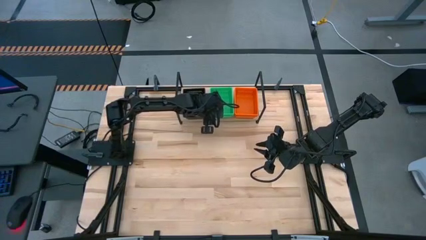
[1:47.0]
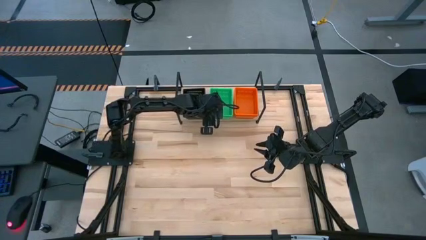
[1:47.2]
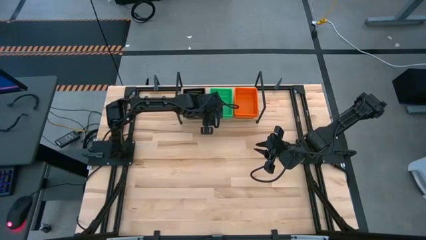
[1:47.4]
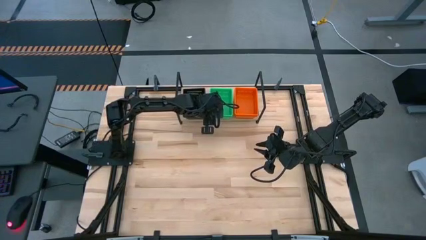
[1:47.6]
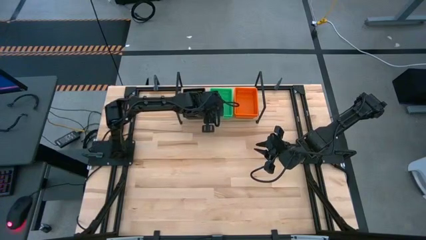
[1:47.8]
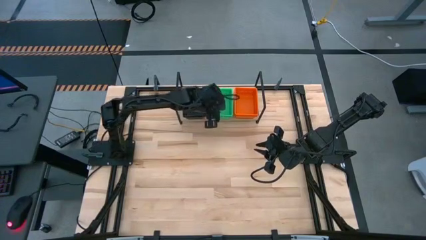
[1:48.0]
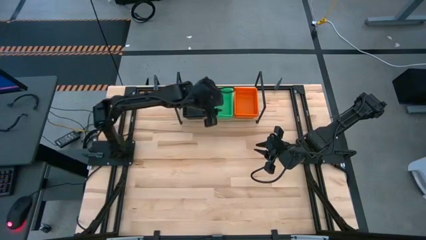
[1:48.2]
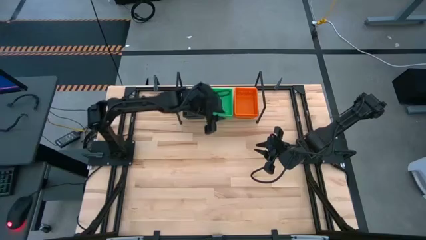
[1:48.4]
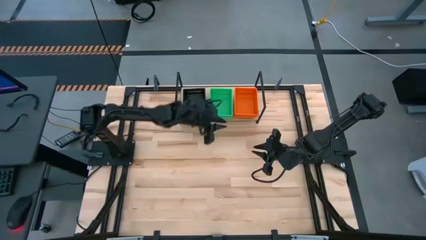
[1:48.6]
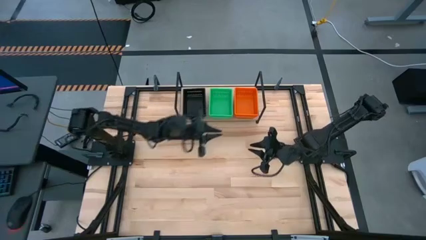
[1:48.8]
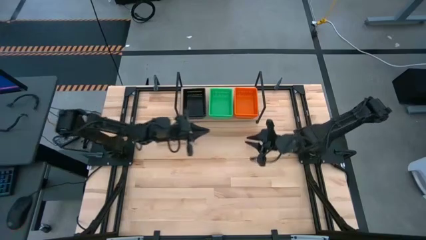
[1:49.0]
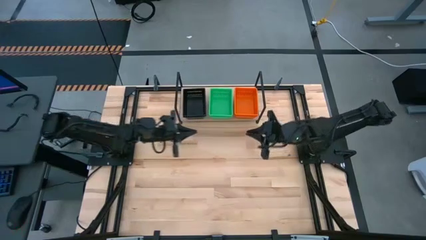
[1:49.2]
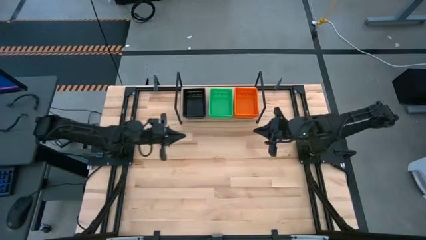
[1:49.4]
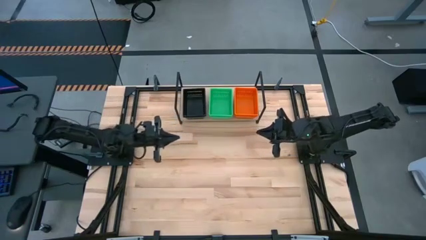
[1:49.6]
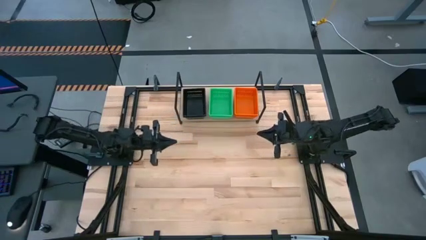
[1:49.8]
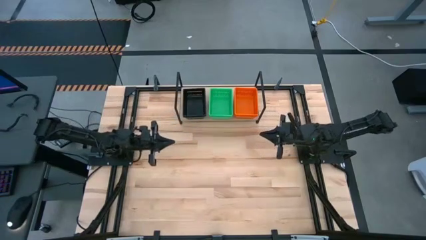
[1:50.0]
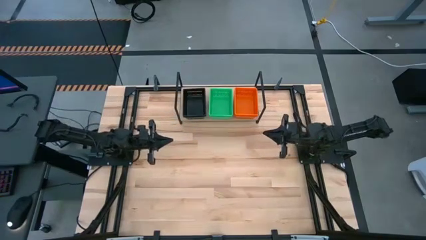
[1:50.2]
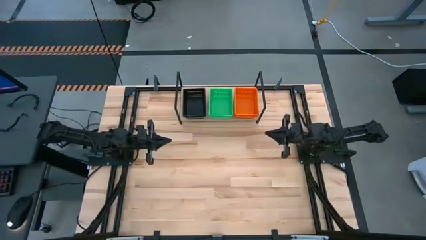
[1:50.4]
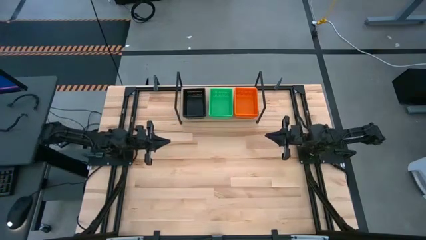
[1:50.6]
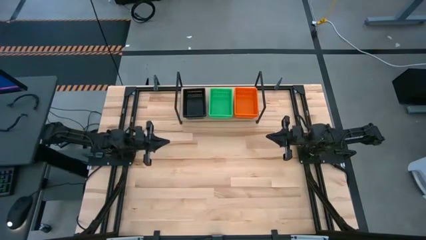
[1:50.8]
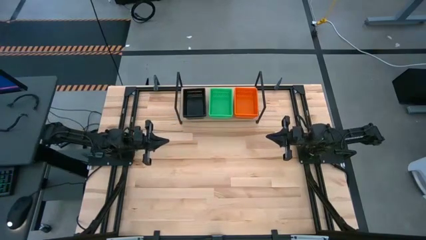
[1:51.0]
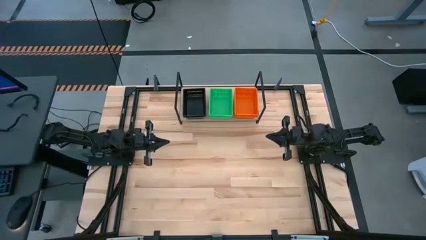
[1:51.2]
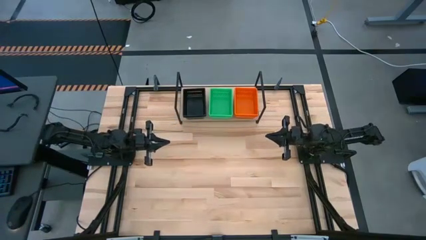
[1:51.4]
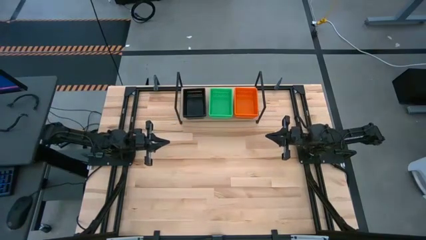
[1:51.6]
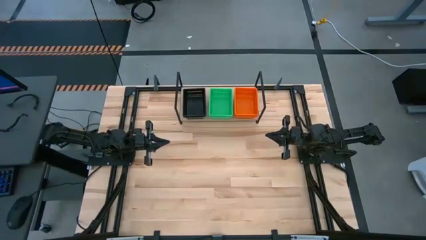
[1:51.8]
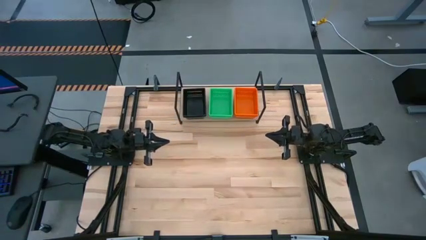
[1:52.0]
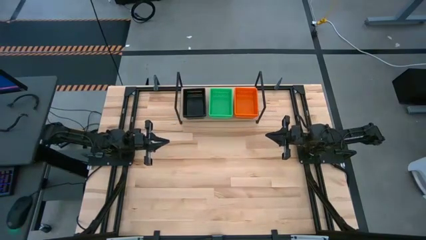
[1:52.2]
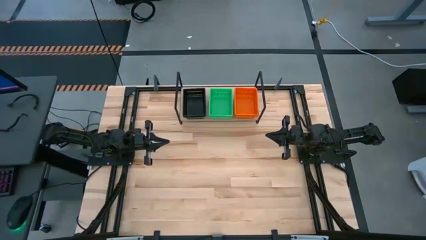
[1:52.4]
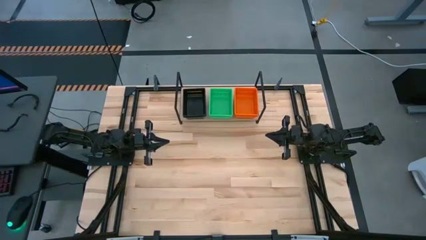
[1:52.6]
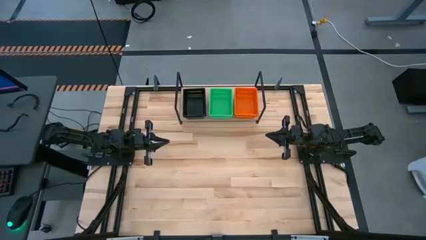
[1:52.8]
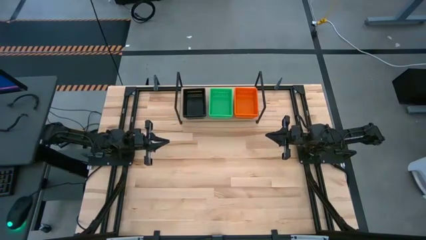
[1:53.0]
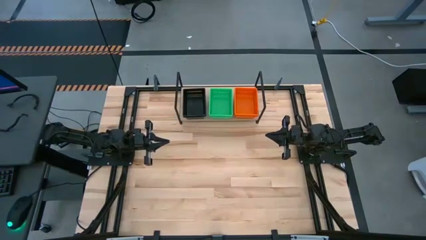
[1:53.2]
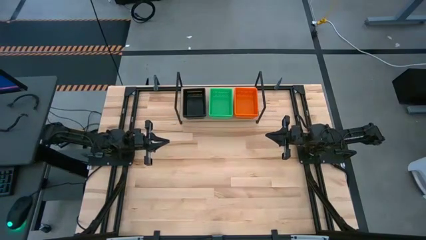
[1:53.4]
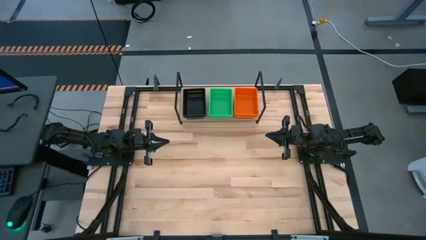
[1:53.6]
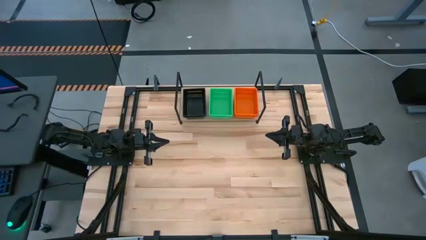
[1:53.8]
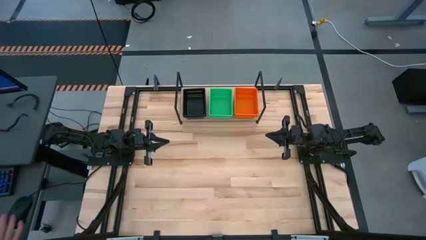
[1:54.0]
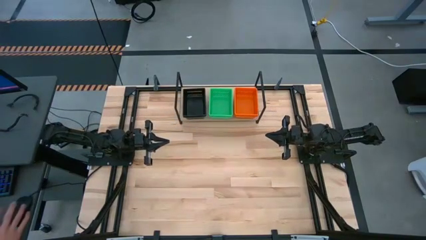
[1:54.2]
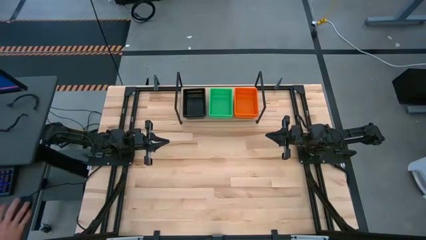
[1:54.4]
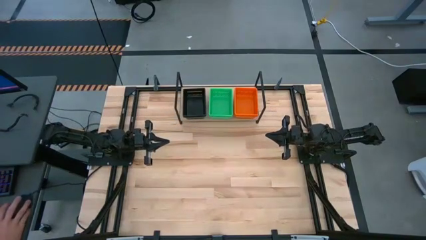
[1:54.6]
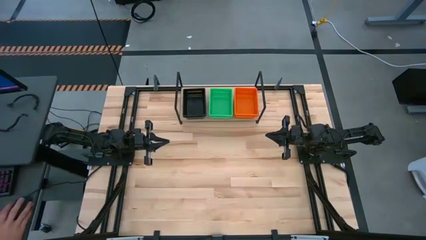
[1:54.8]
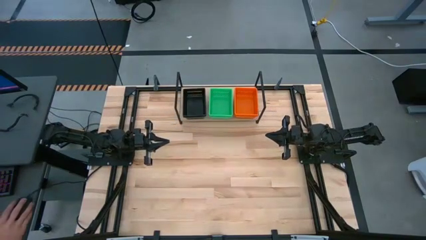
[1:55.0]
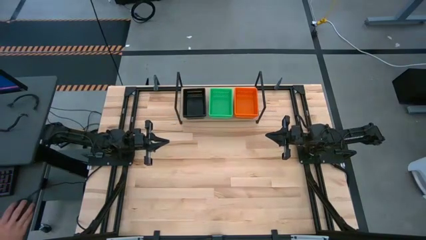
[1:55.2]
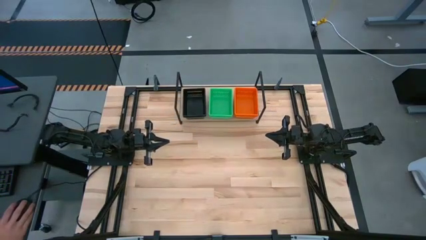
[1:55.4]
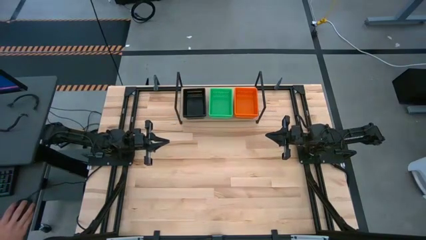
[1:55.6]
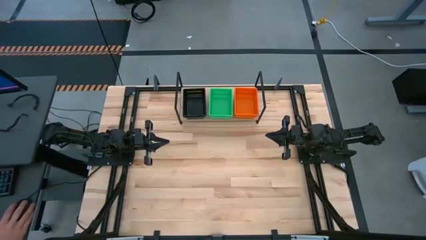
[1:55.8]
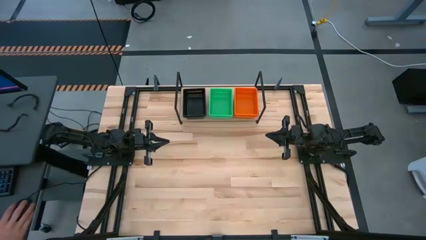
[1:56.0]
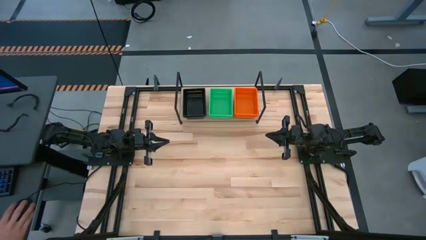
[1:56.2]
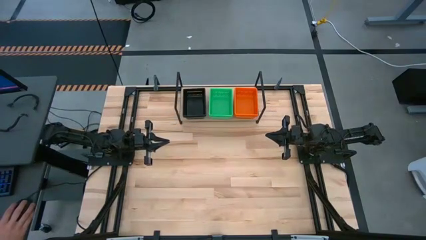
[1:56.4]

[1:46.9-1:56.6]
Task: Stack baskets on shelf by color
Return to Home Position

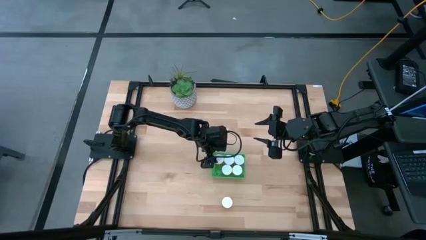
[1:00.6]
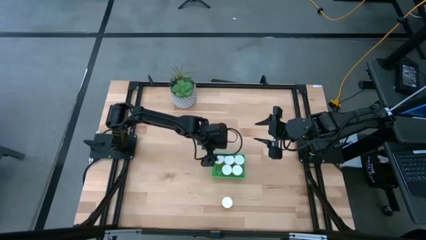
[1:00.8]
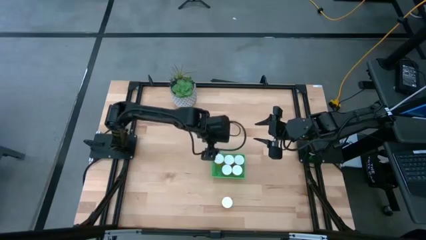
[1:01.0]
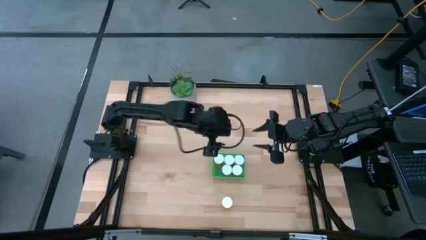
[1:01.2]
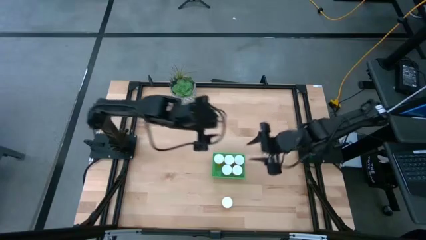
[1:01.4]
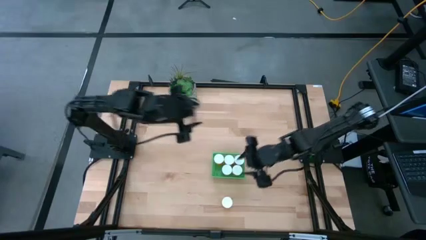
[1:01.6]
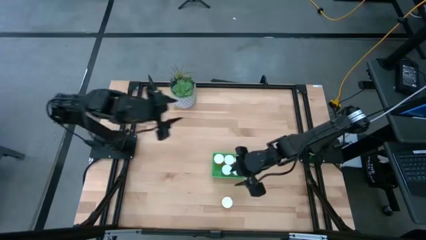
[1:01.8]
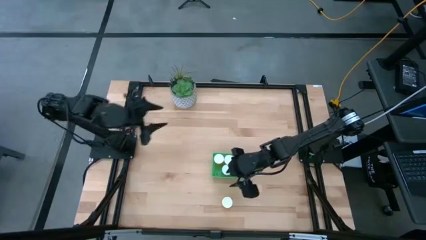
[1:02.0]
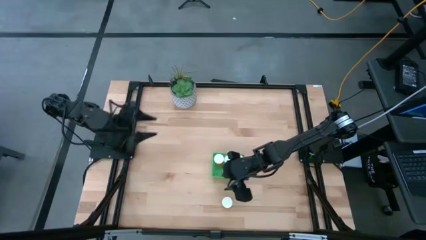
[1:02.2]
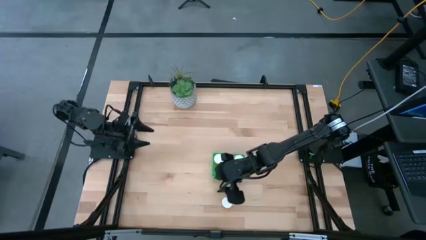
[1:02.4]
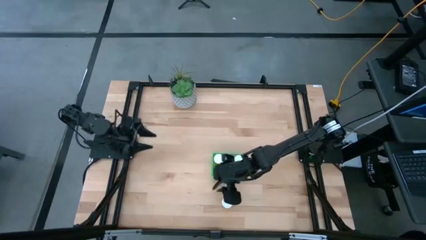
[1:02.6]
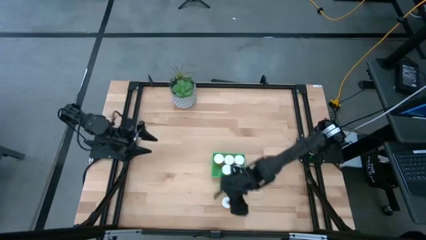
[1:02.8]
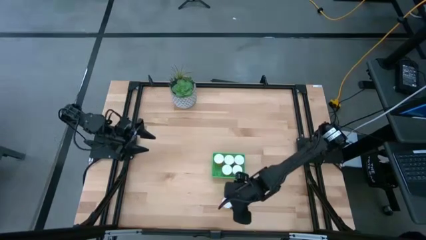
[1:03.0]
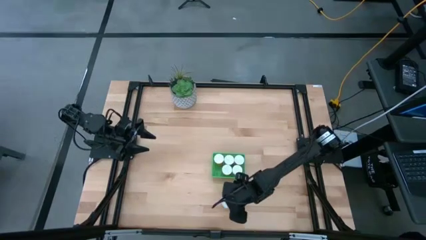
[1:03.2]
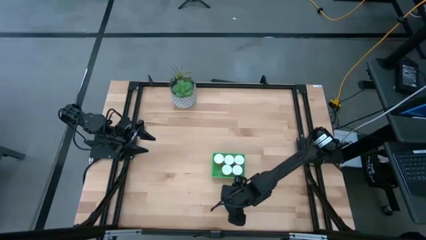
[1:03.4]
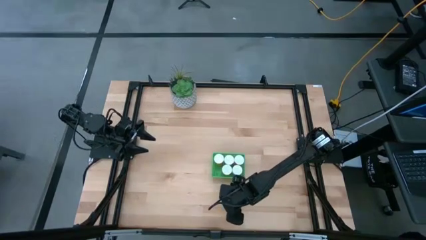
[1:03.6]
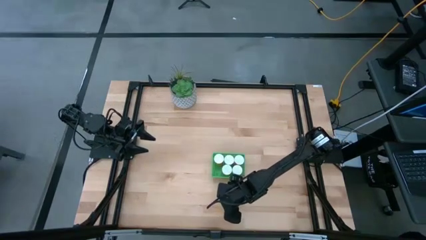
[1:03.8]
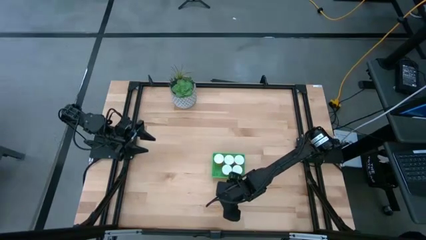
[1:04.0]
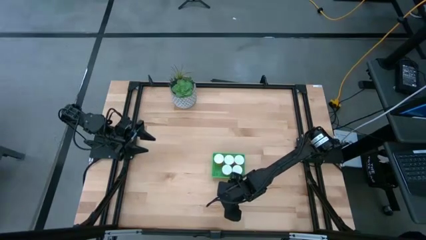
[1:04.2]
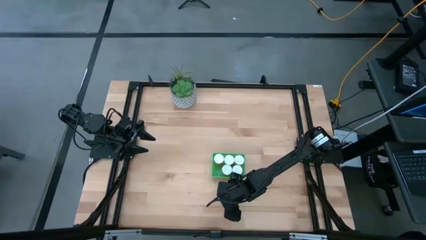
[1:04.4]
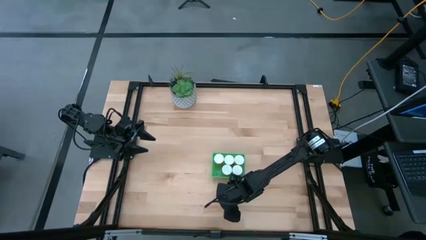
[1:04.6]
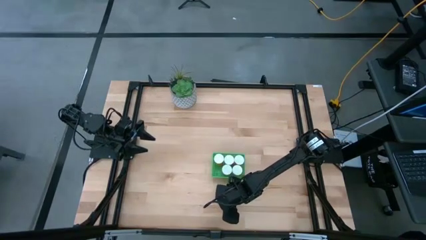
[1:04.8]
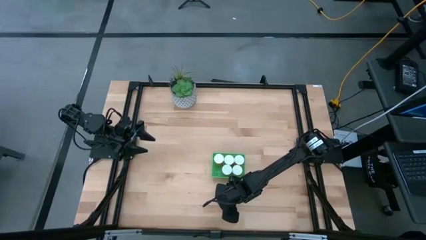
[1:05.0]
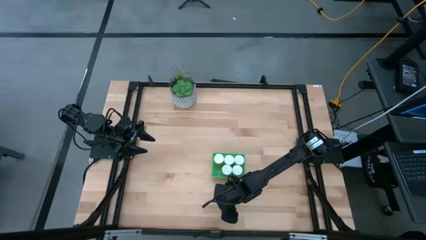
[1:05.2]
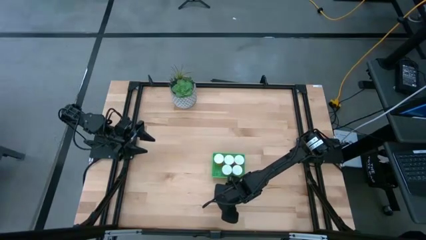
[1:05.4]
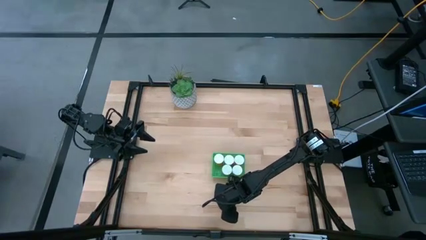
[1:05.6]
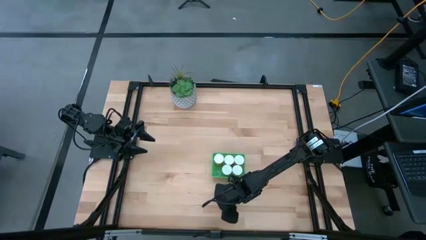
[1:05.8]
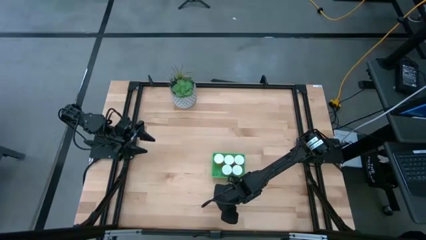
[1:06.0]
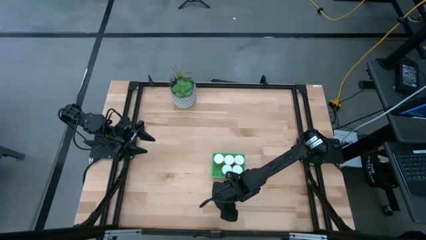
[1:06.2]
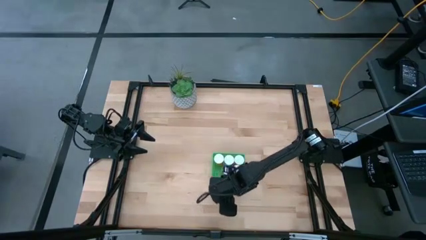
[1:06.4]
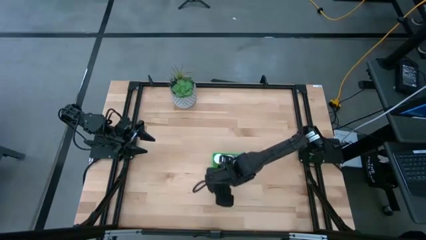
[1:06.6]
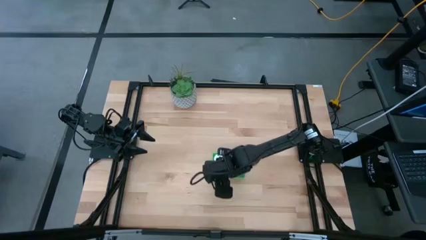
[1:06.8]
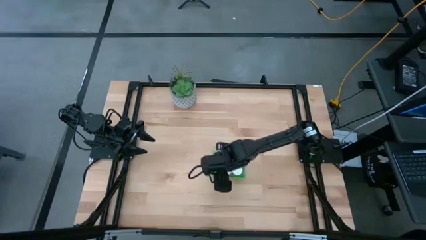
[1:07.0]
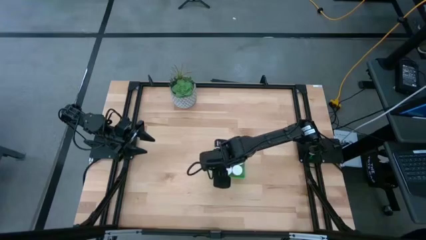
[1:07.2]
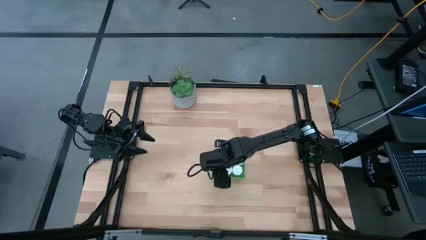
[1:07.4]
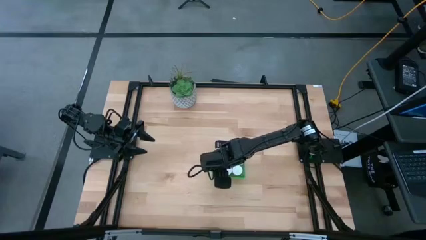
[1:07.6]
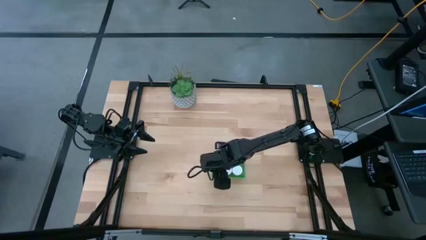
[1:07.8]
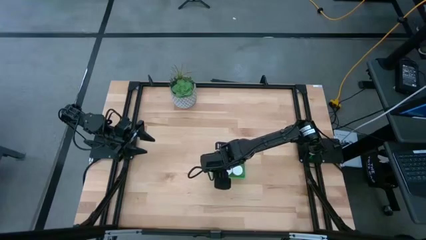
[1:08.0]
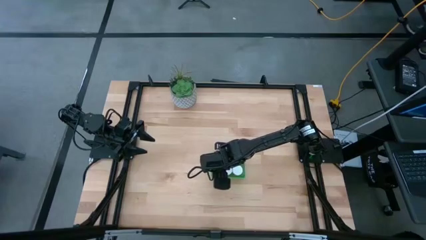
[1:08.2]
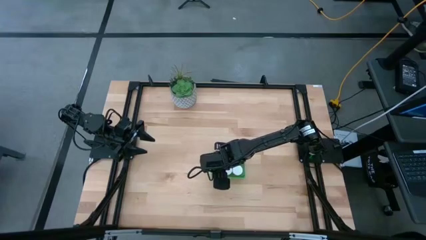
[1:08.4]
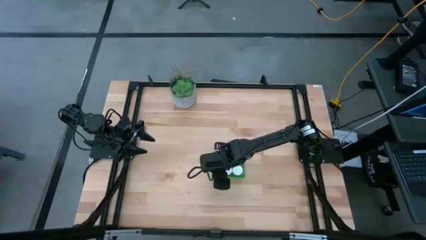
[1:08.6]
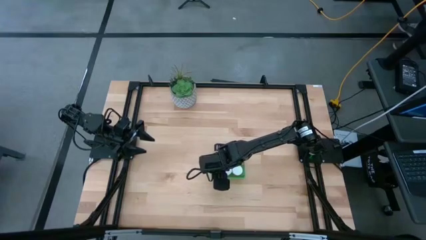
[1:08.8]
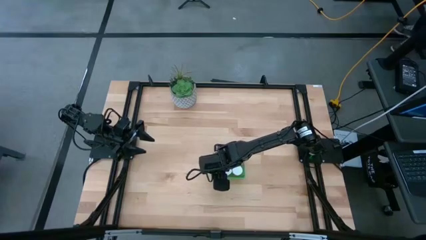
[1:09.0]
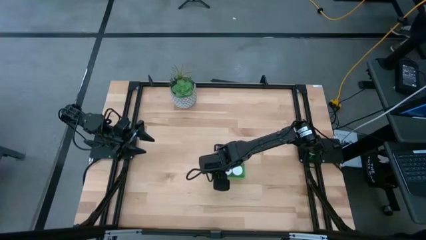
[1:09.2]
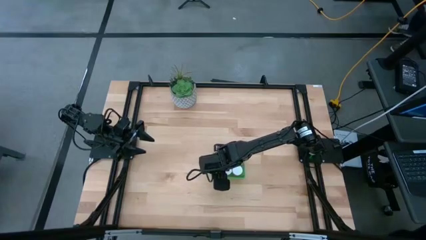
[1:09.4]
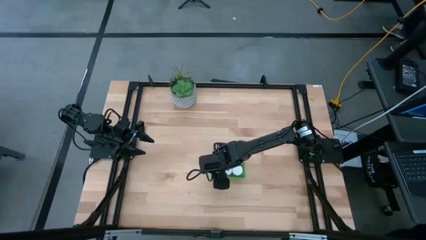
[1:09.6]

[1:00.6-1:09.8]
Task: Pick and place pill bottles into a basket
Put the orange pill bottle into the green bin
